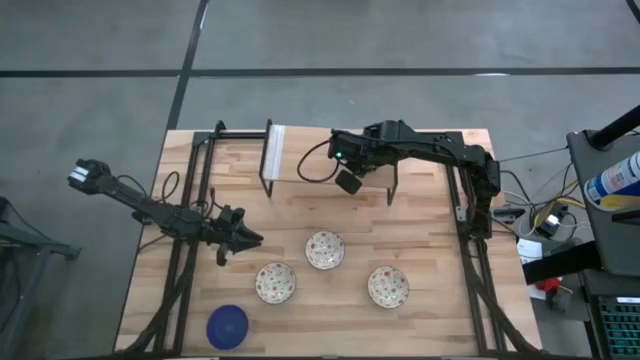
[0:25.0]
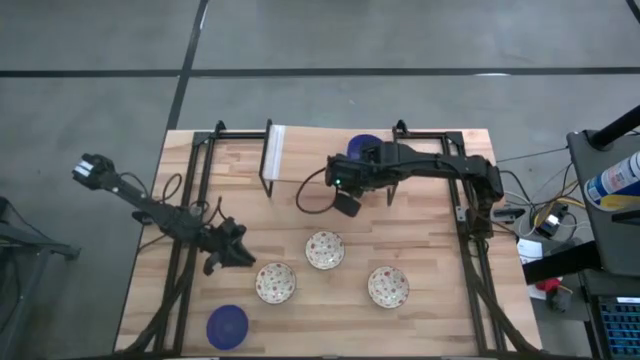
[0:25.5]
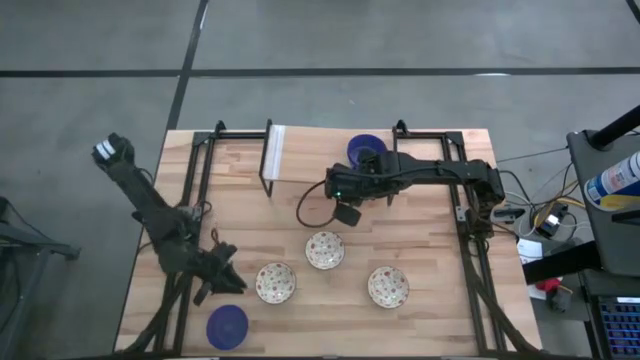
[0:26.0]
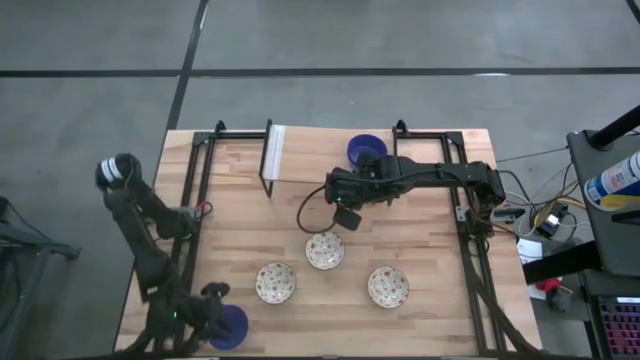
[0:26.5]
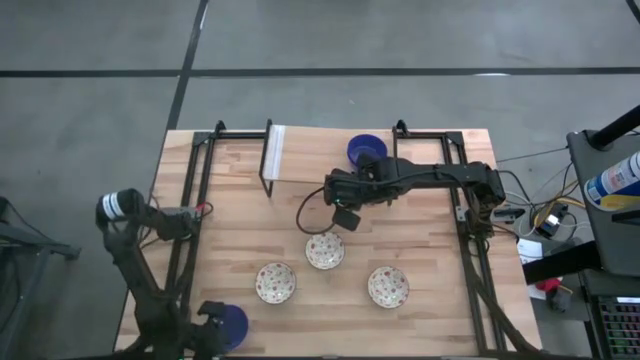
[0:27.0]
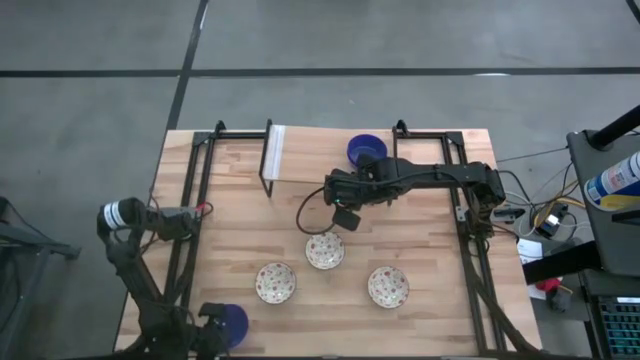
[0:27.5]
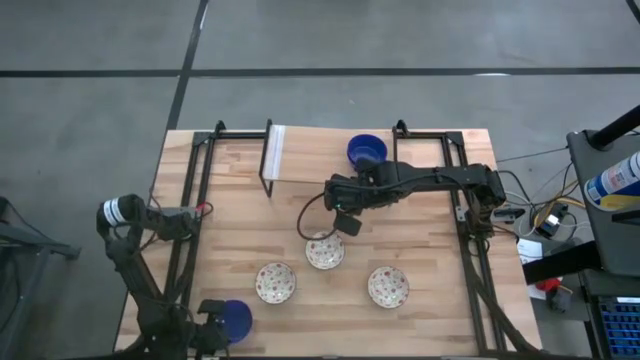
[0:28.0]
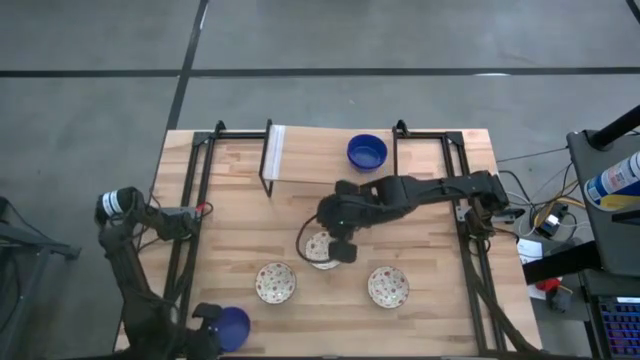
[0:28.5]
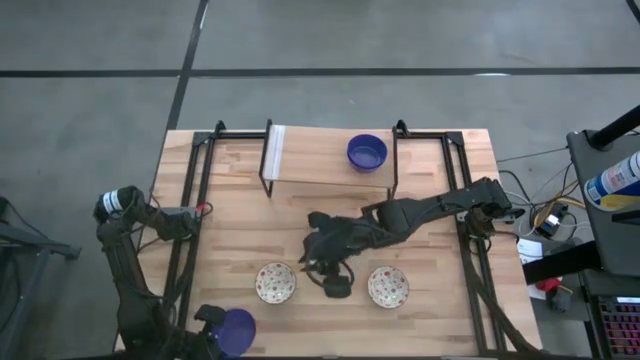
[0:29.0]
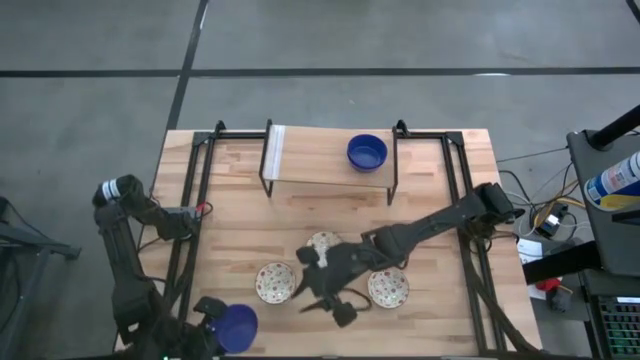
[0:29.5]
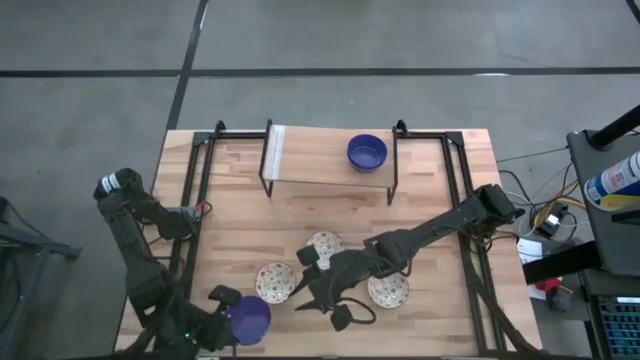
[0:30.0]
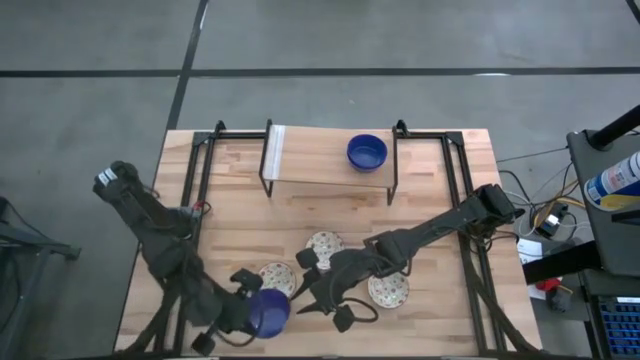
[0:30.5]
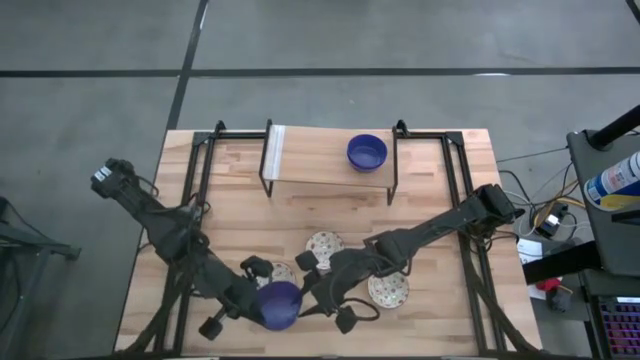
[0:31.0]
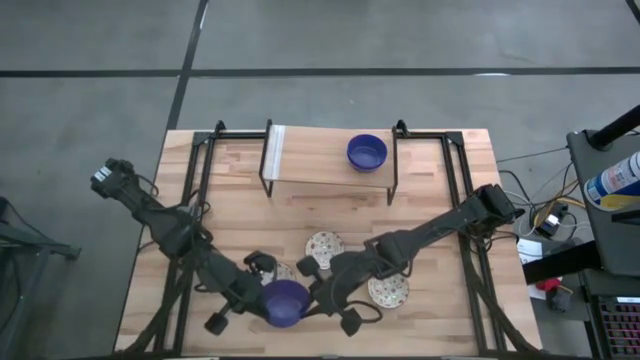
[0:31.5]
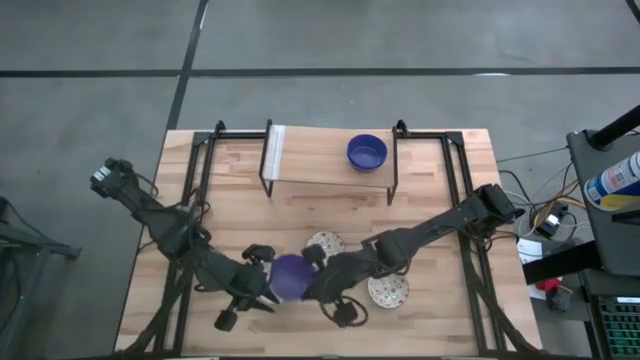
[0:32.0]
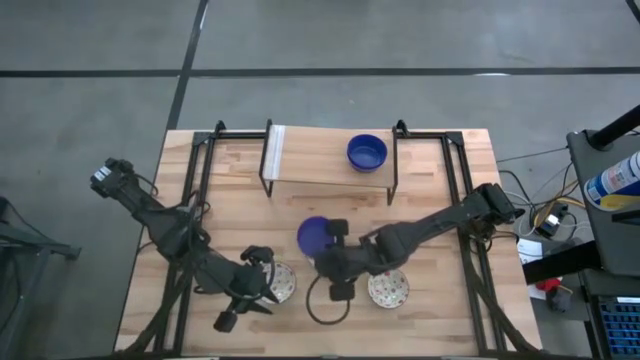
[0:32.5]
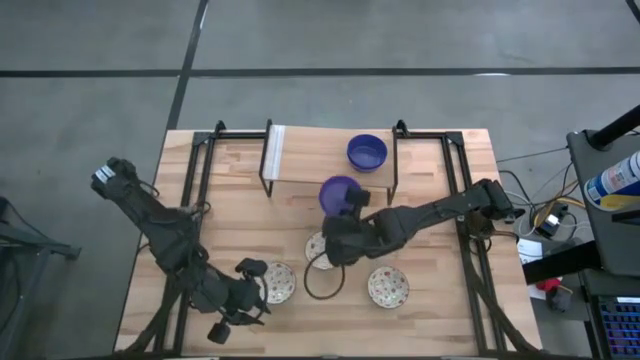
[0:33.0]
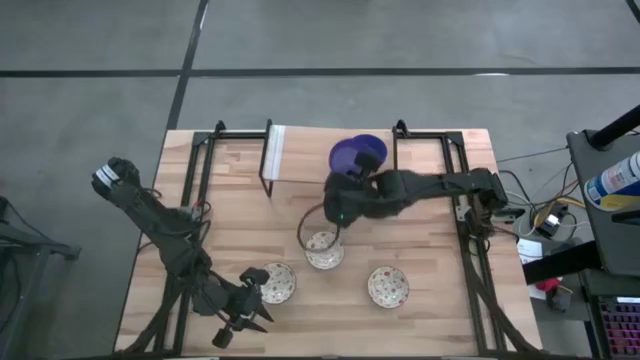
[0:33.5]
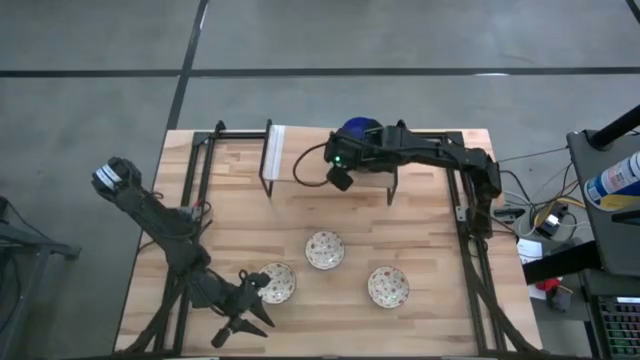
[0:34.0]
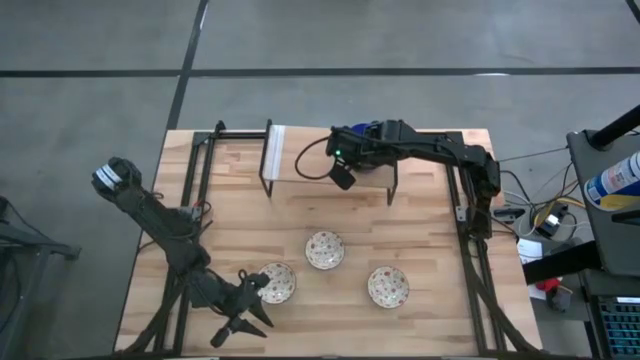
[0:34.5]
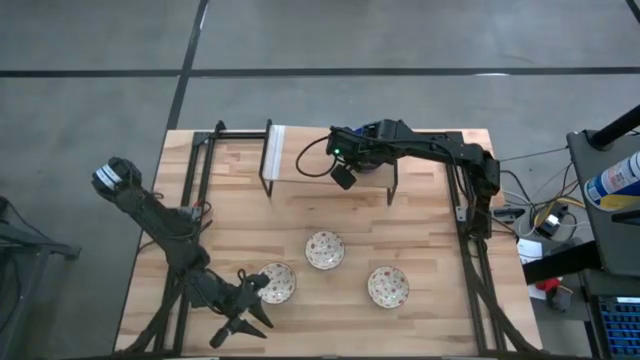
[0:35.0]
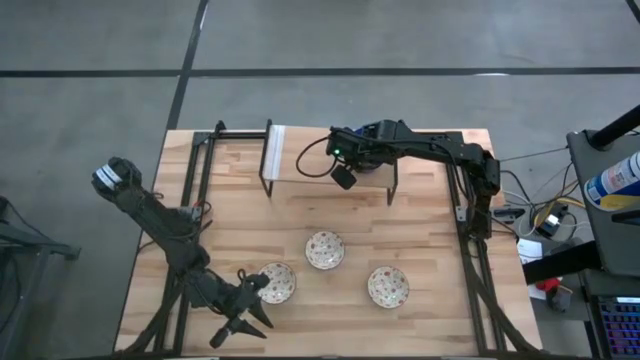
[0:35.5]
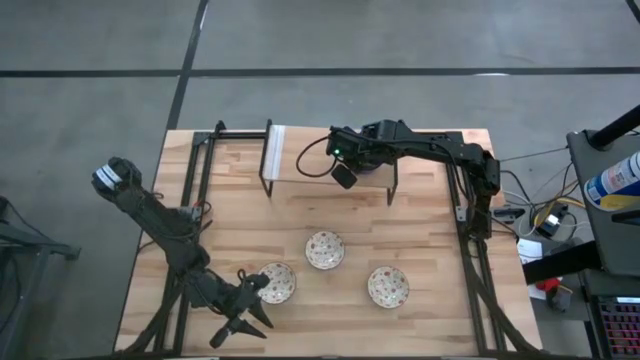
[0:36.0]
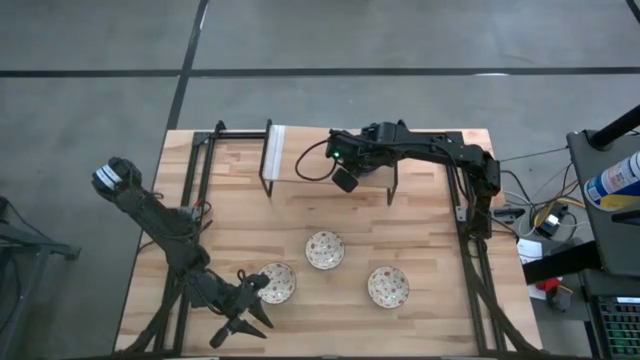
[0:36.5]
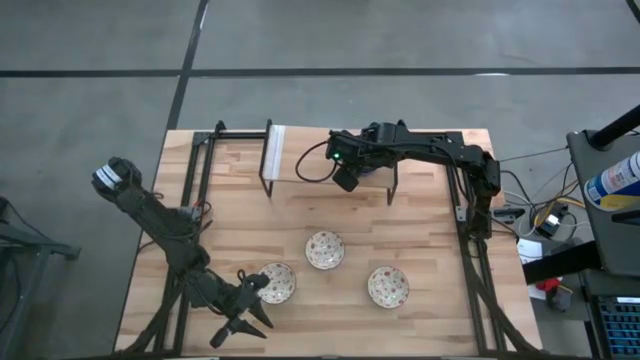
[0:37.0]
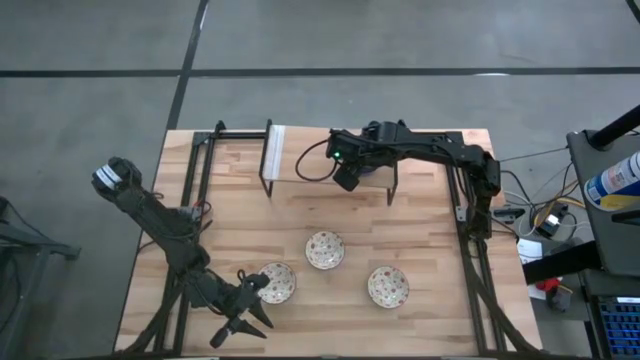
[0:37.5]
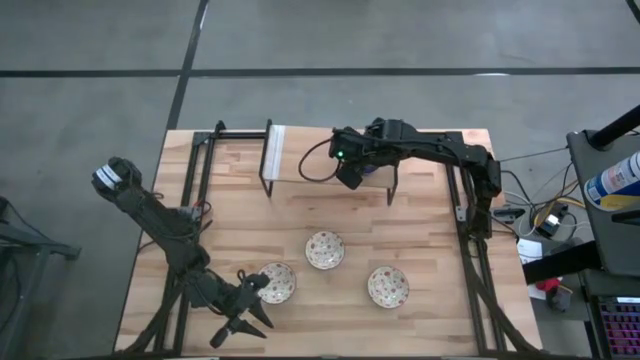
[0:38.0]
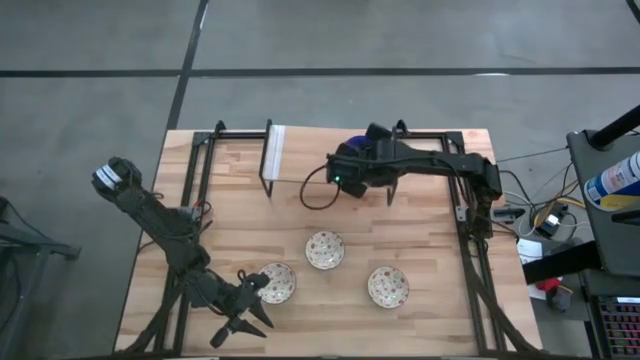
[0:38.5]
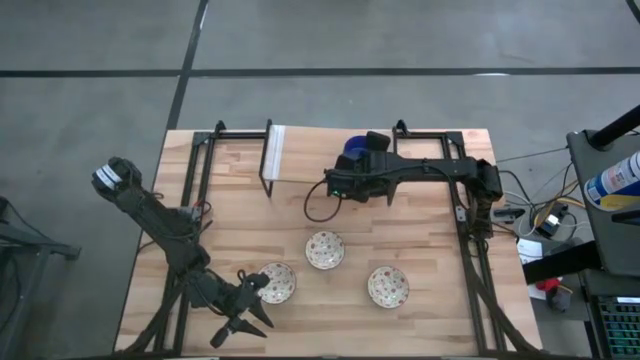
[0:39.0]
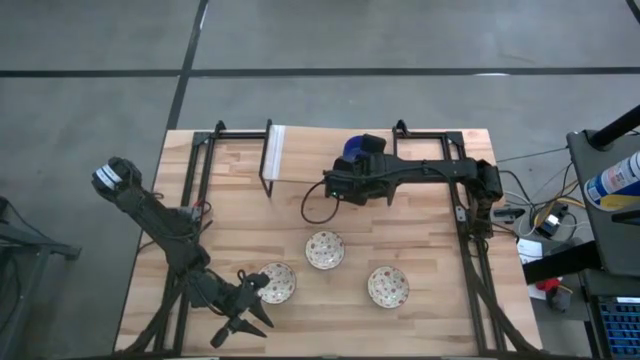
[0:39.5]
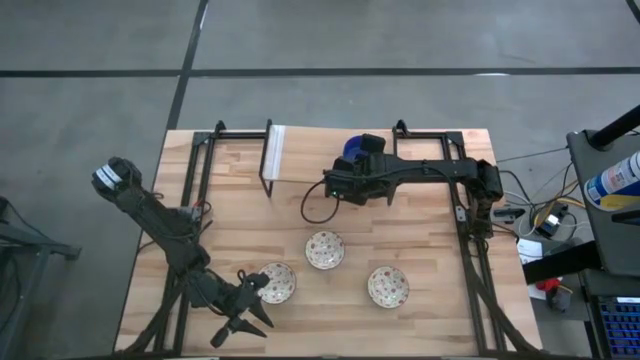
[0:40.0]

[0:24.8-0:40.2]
Task: Pick & Place Mini bowls
Stack the blue bowl on the blue bowl on the shelf

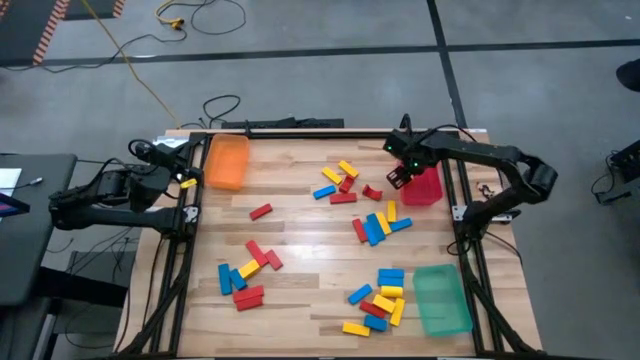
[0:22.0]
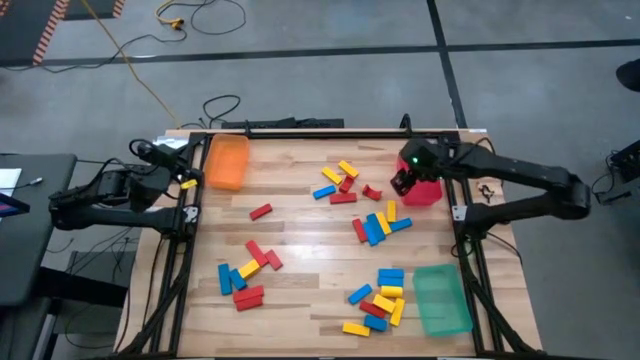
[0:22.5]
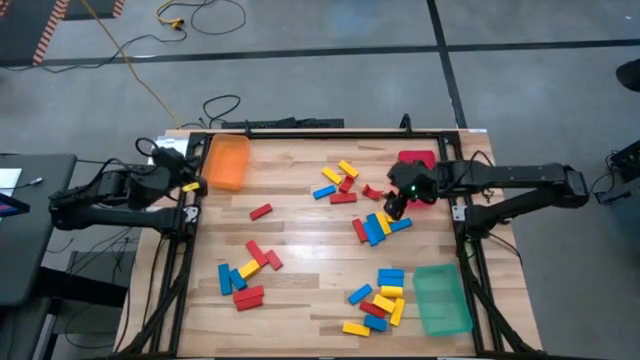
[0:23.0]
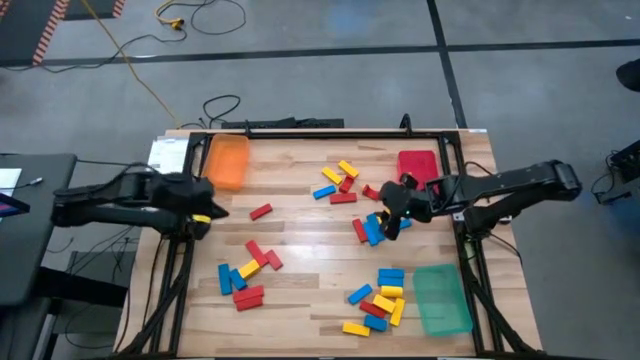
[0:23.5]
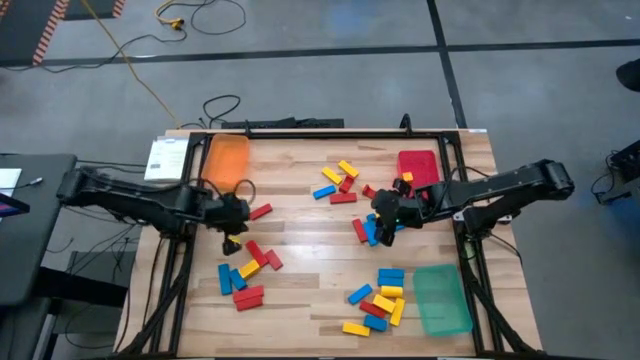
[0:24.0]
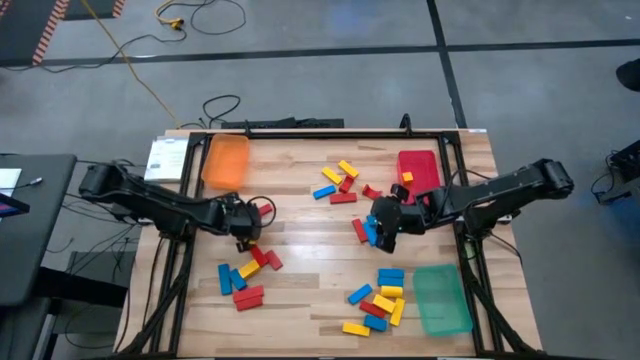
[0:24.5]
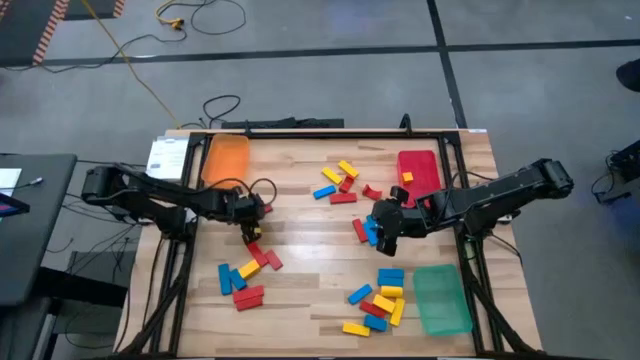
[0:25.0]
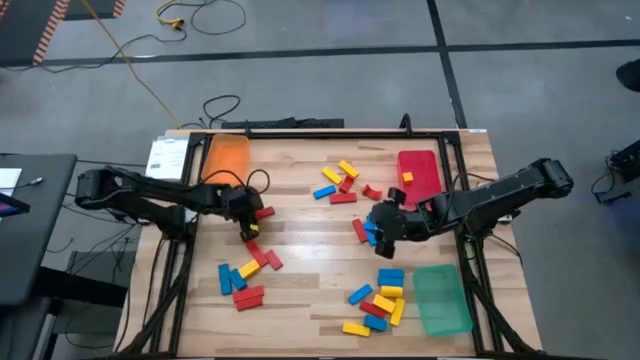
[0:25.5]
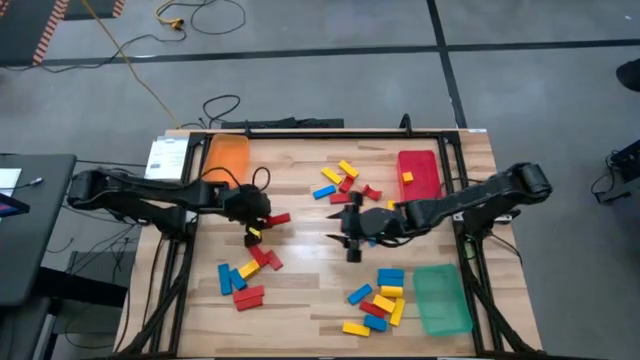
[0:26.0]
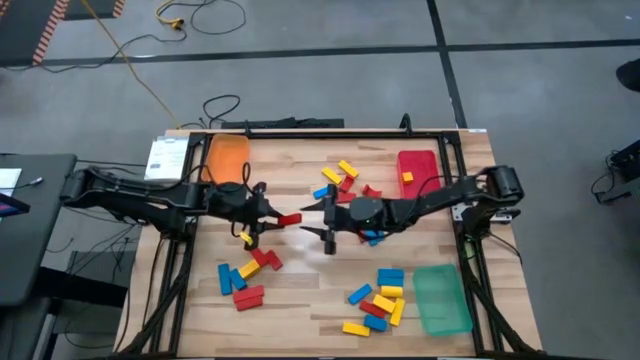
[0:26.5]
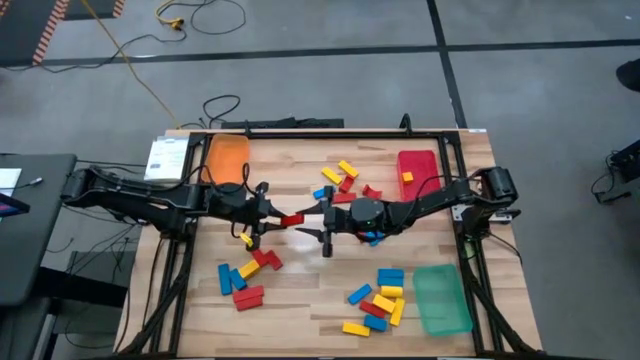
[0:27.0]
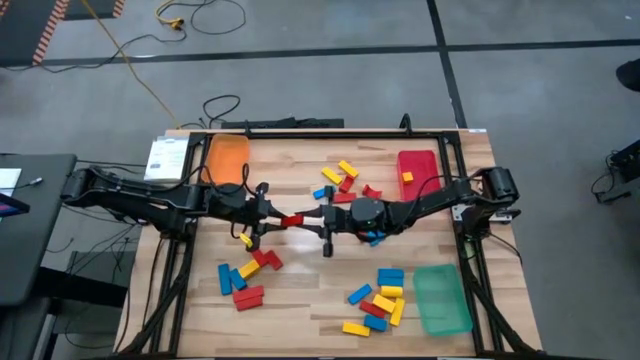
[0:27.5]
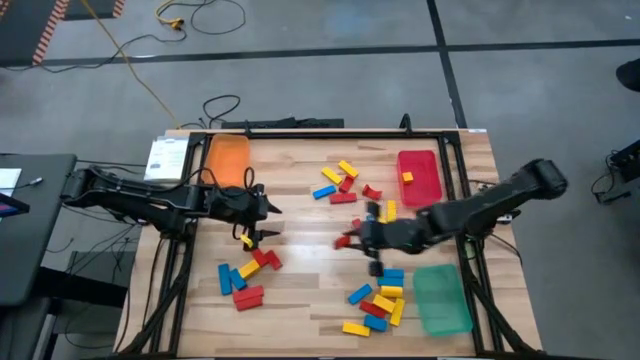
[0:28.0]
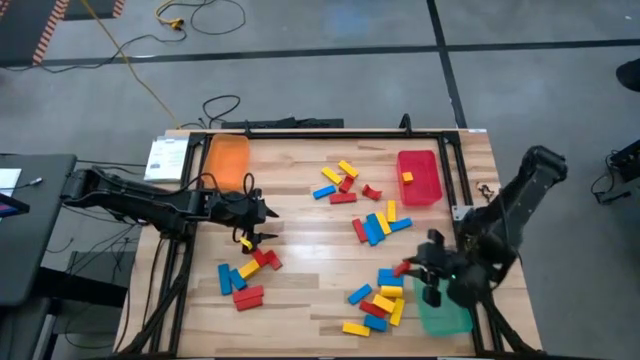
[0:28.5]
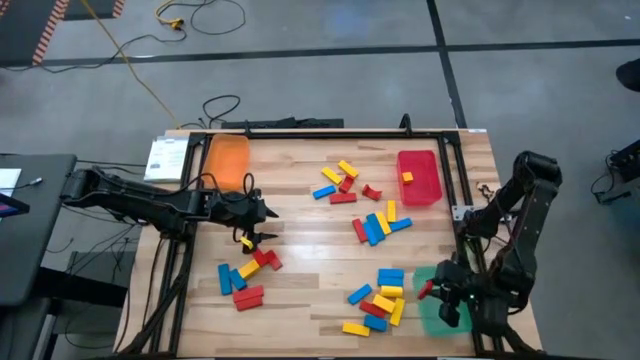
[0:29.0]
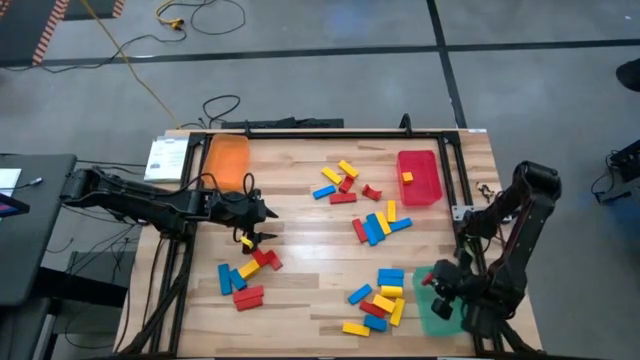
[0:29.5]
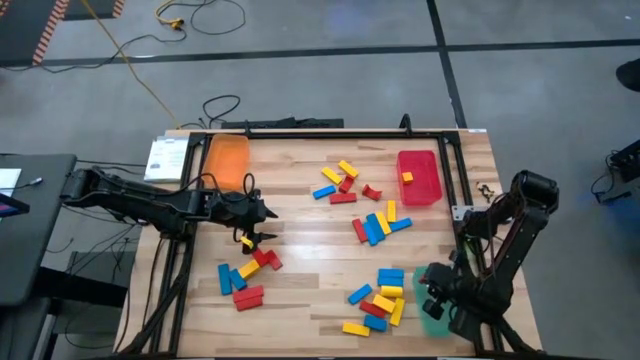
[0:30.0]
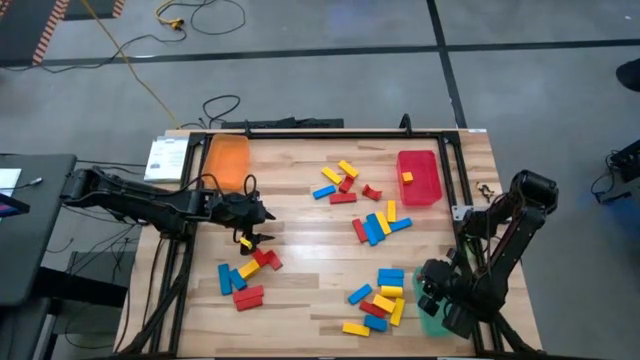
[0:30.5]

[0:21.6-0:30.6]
Task: Sort blocks
Put the red rectangle block into the green bin
